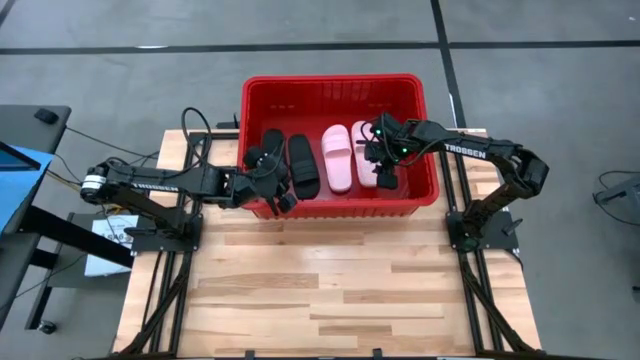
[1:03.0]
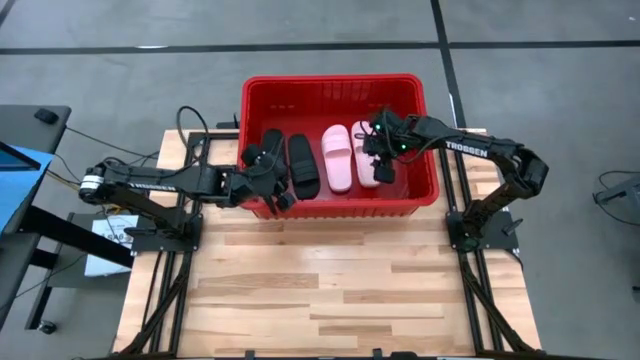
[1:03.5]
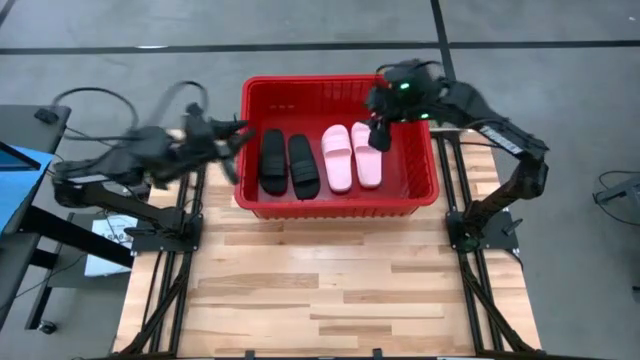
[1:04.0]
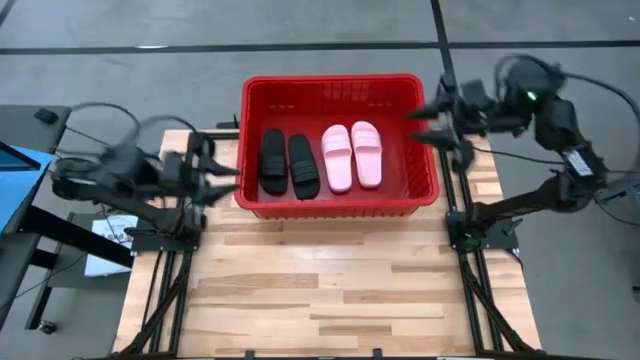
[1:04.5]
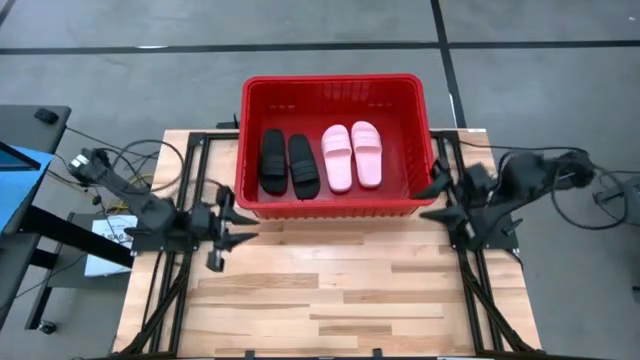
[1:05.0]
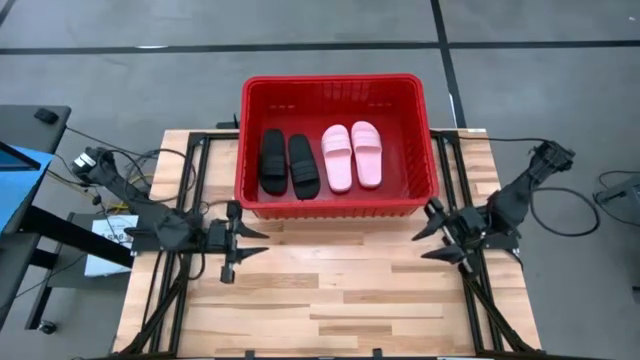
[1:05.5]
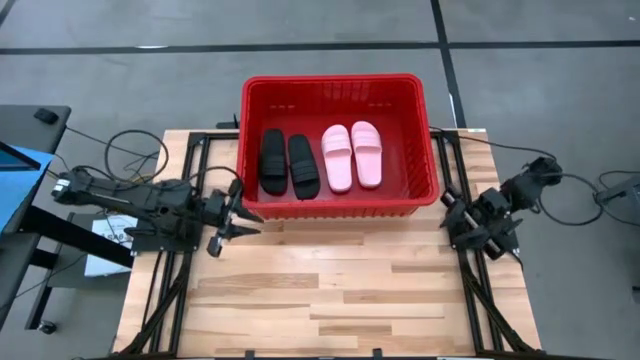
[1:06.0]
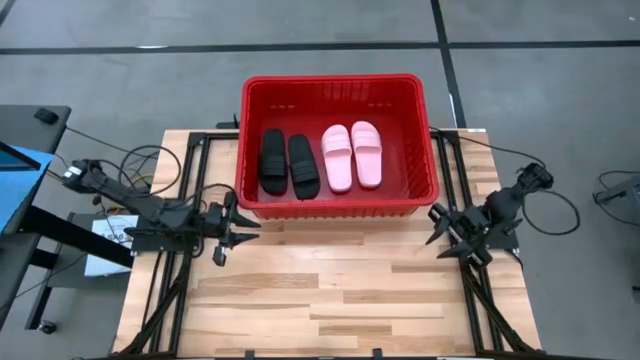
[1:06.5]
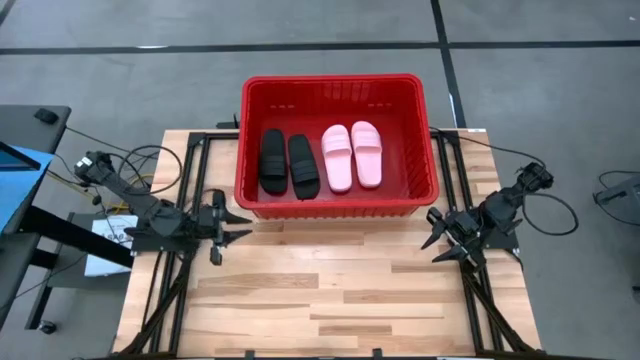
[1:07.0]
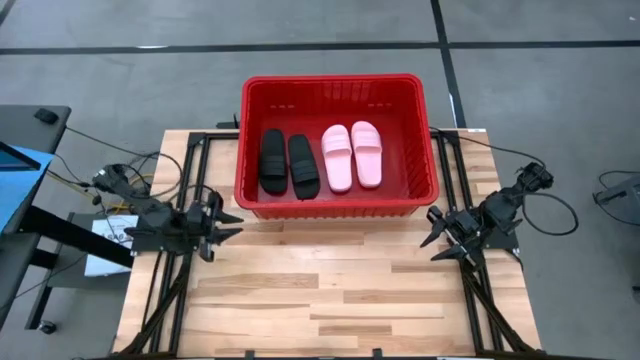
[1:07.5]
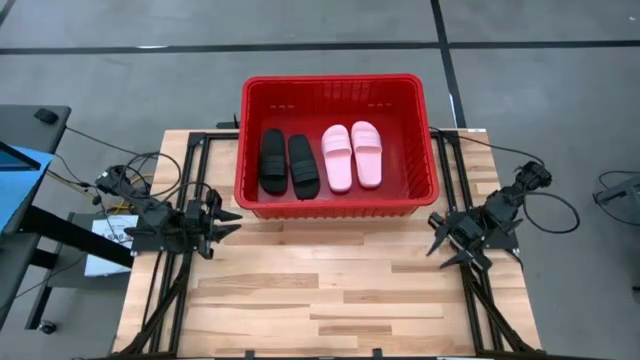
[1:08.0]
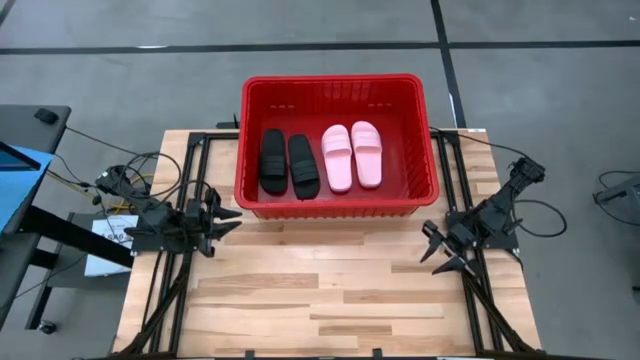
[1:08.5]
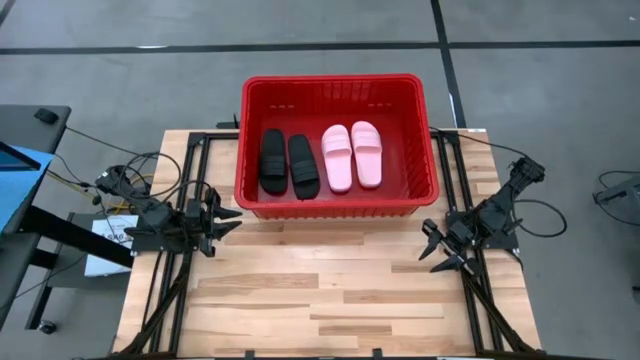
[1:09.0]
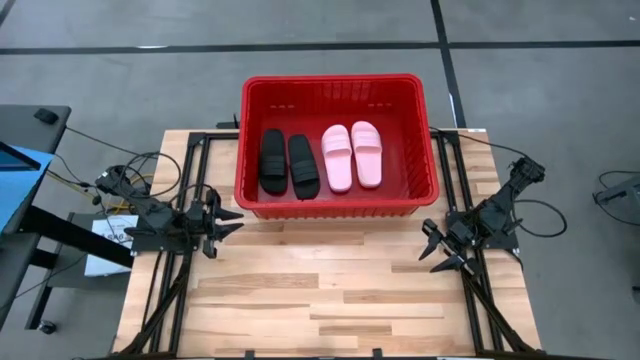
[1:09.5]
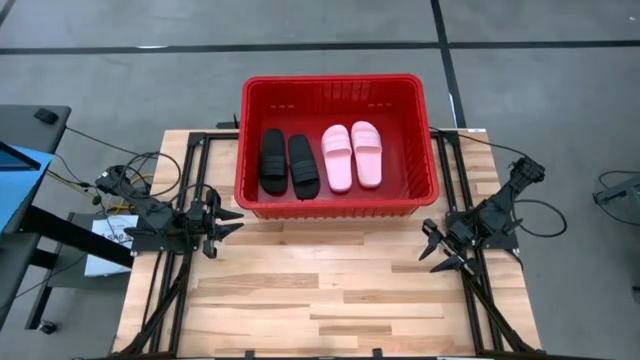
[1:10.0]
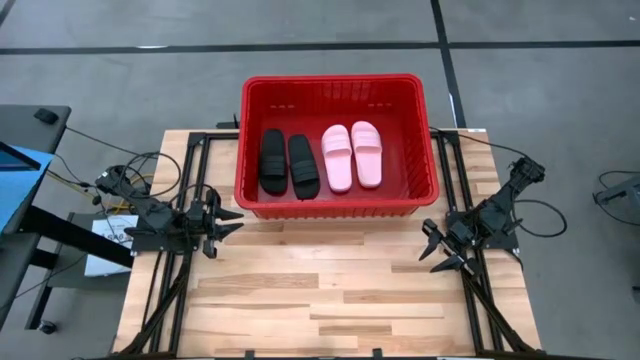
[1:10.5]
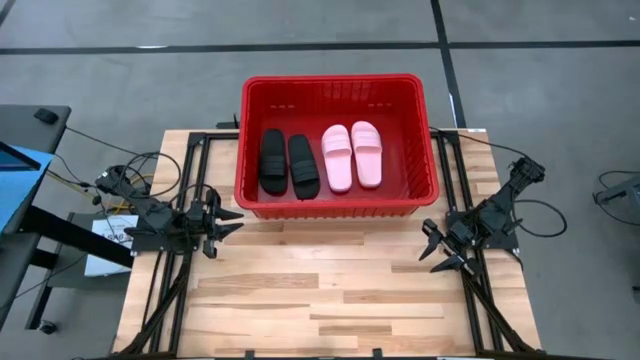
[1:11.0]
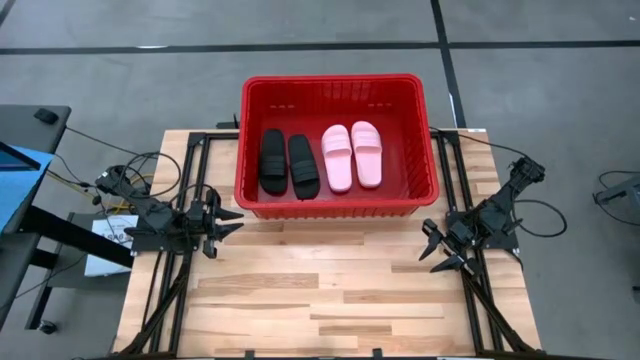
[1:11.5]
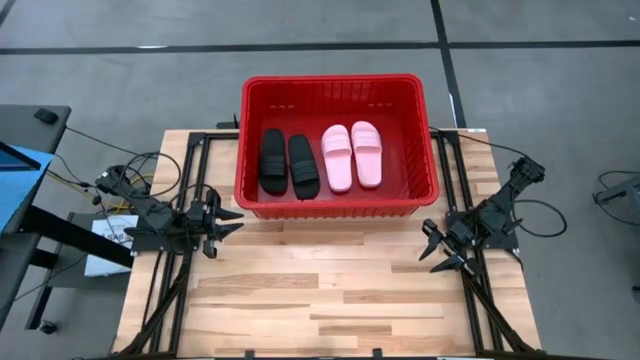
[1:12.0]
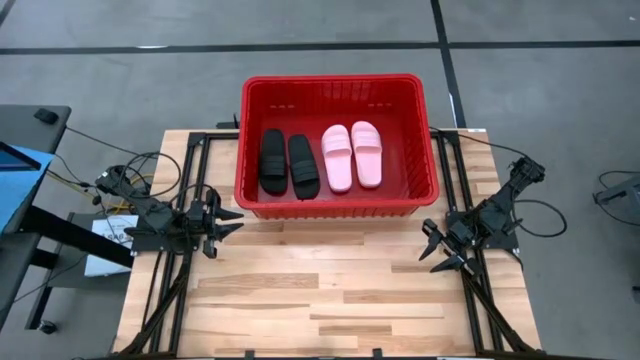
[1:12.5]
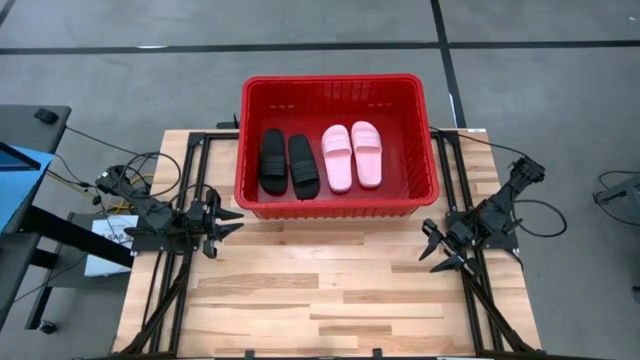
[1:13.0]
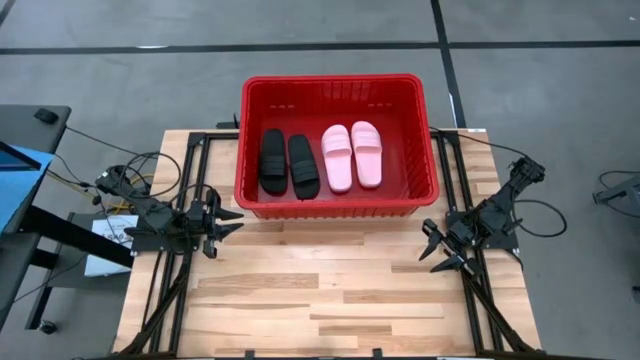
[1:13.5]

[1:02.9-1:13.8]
Task: Pick and place slides into bin
Return to Home Position

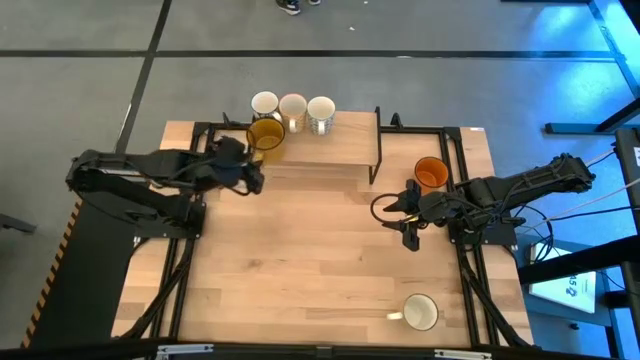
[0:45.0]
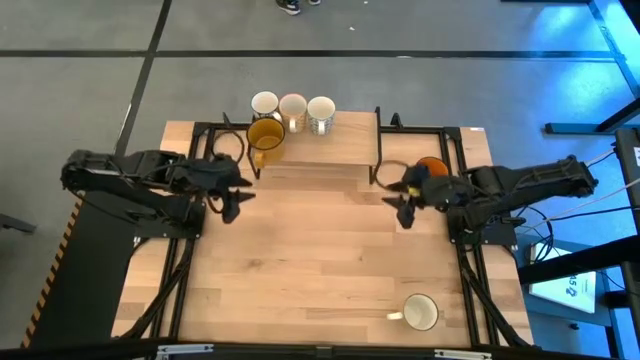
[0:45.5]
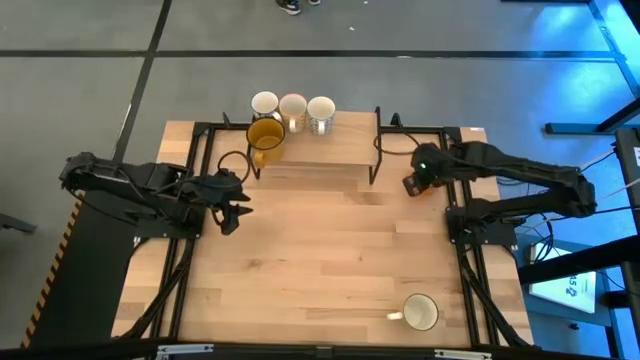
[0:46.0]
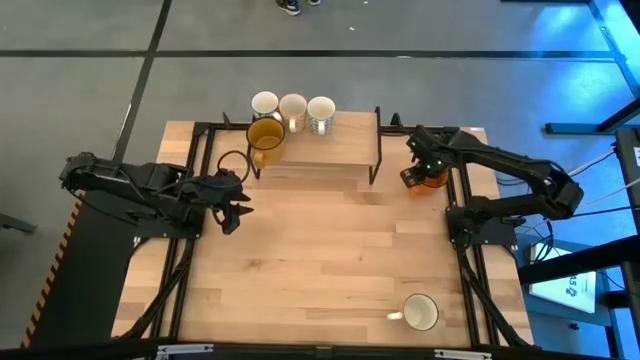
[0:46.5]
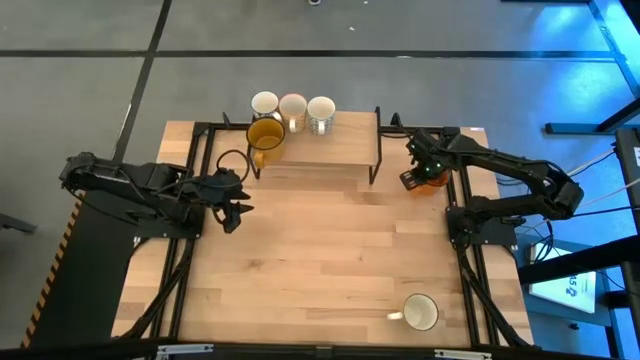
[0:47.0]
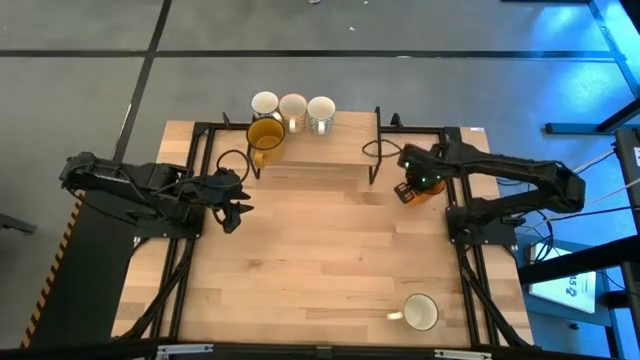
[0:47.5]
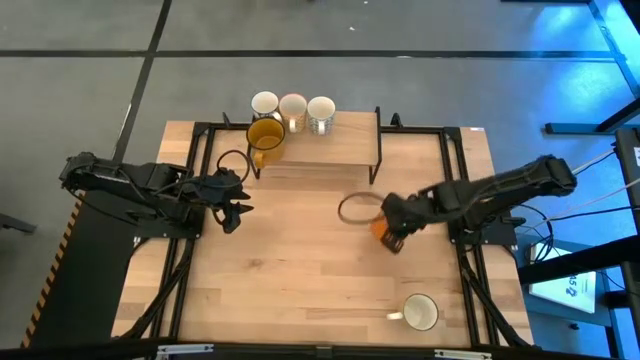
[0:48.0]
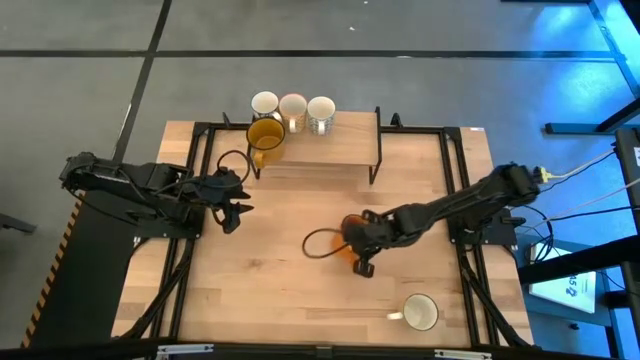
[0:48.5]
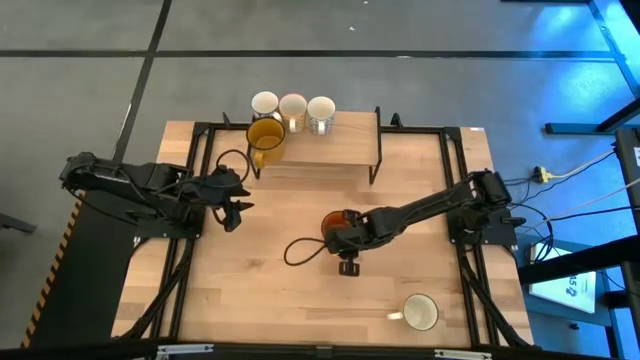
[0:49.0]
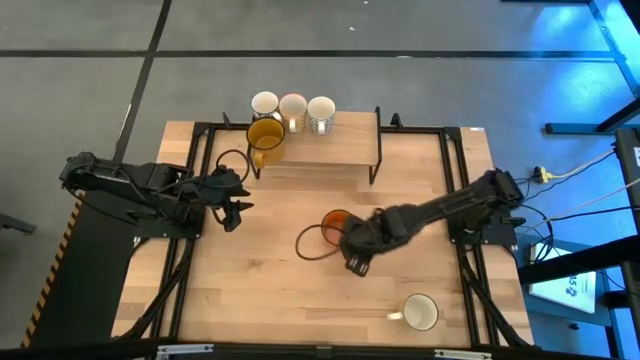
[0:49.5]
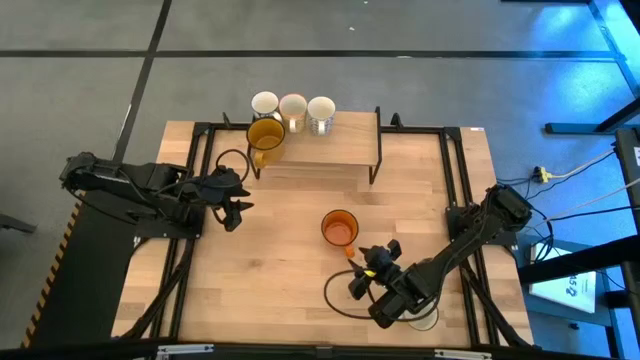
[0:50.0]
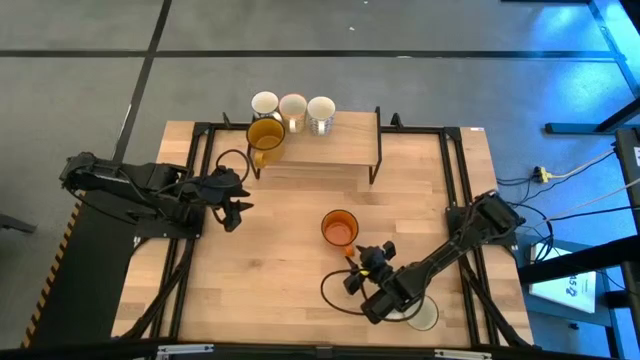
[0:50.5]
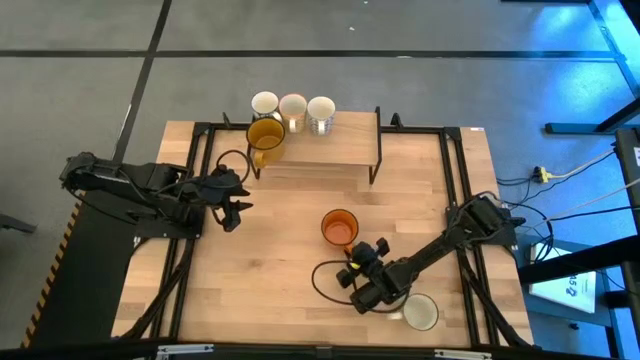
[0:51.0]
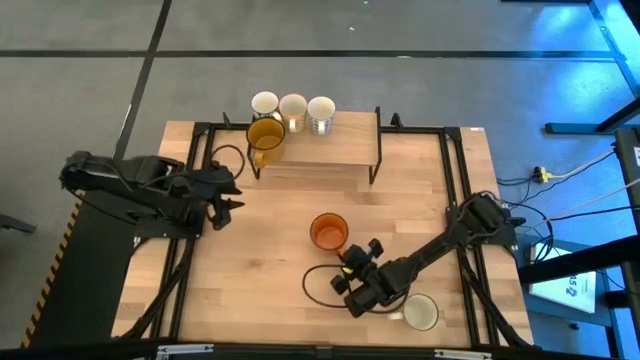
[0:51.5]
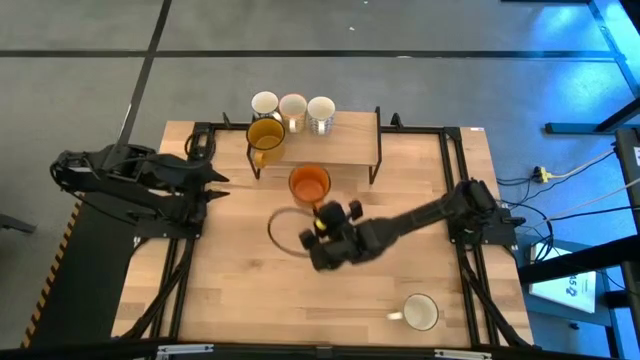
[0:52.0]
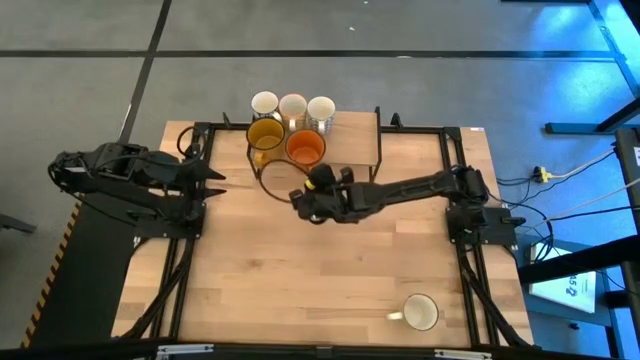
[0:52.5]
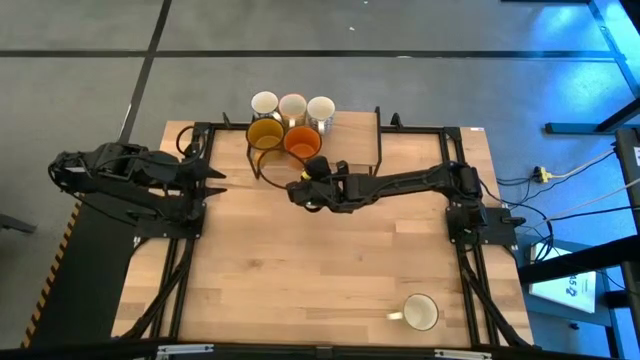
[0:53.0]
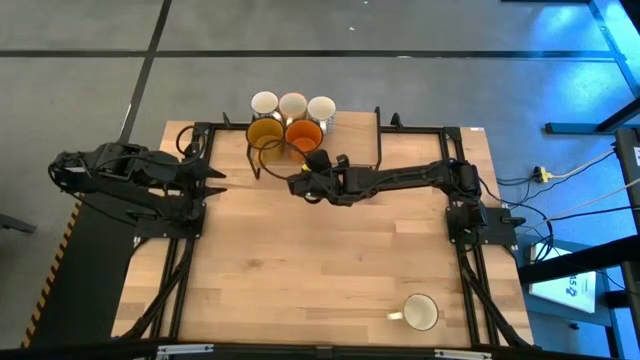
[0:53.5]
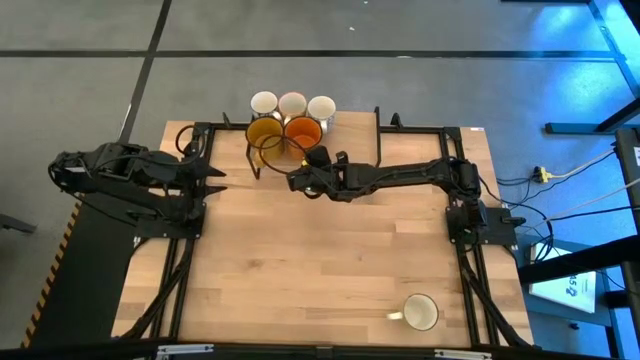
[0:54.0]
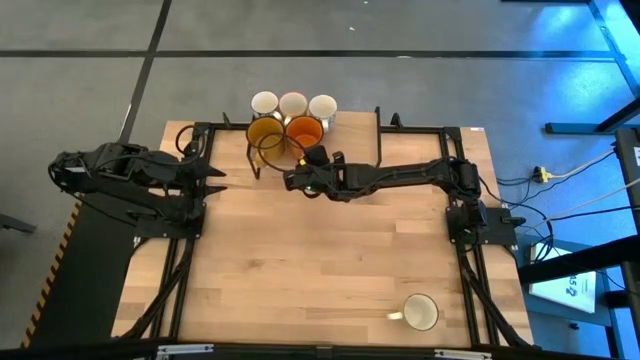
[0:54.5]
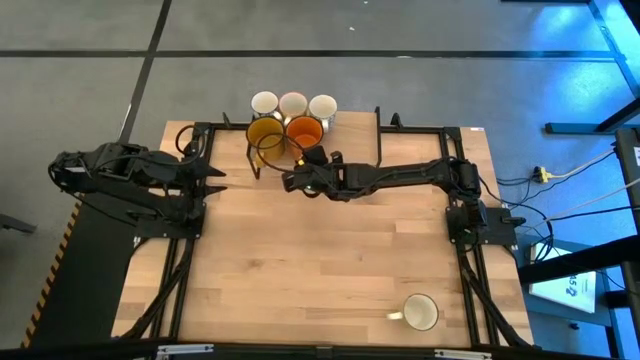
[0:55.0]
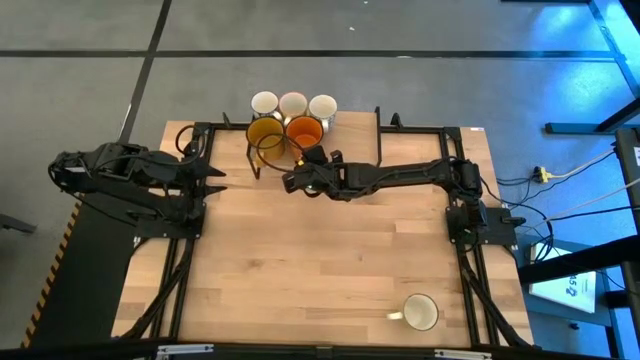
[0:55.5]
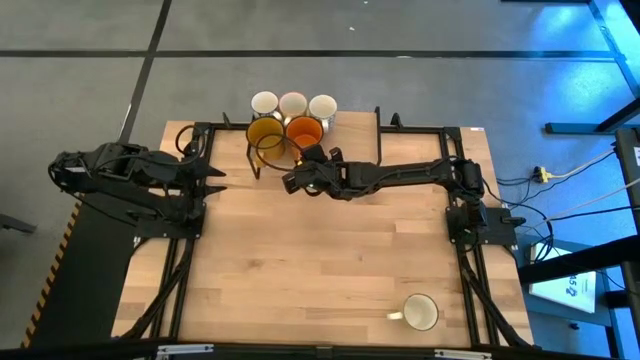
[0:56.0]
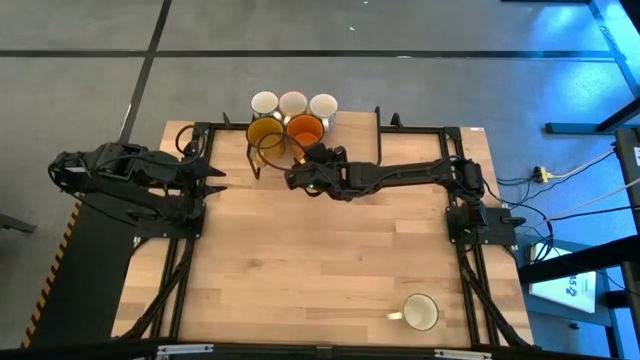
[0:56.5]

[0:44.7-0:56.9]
Task: Place coffee mugs
Put the orange mug on the shelf
